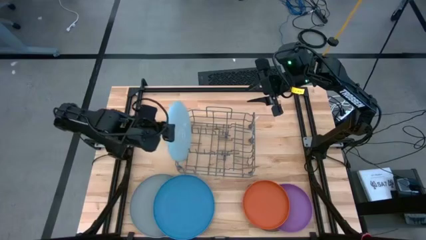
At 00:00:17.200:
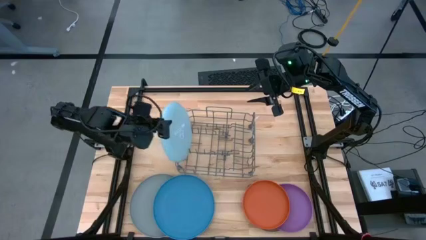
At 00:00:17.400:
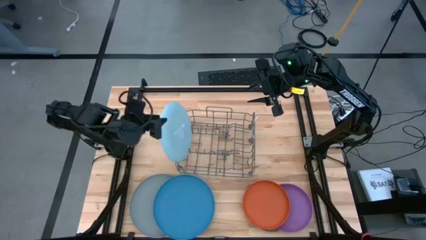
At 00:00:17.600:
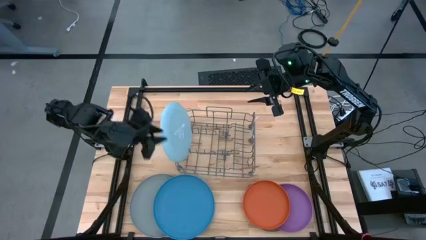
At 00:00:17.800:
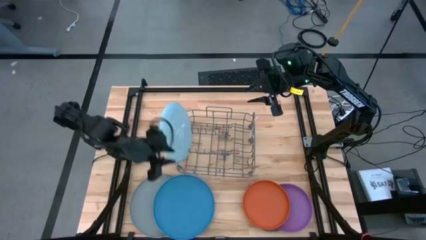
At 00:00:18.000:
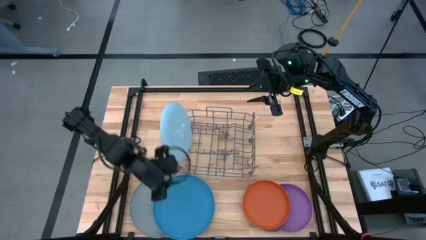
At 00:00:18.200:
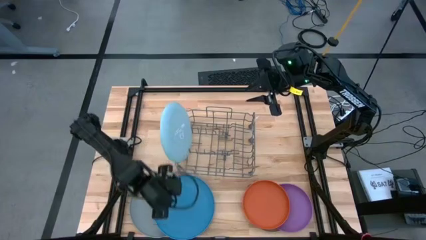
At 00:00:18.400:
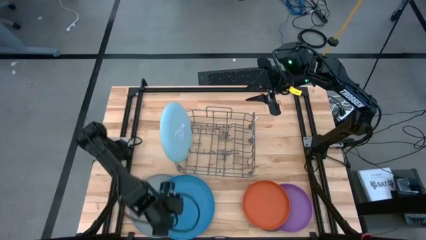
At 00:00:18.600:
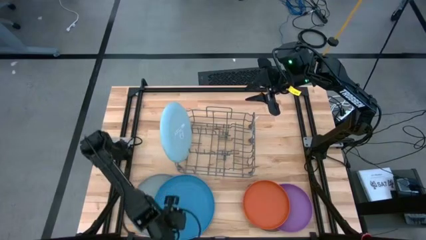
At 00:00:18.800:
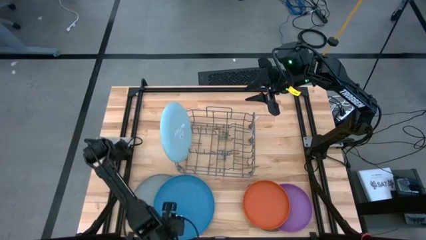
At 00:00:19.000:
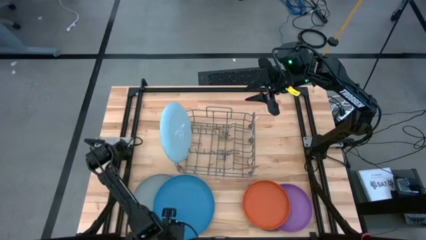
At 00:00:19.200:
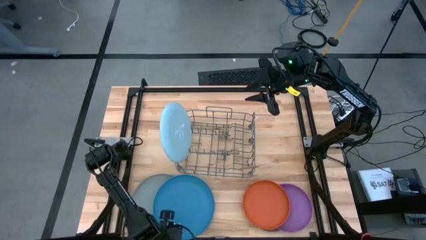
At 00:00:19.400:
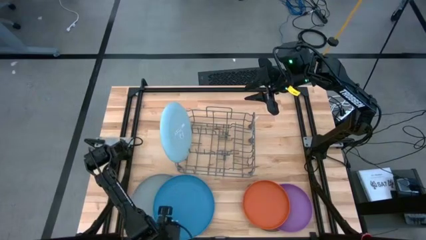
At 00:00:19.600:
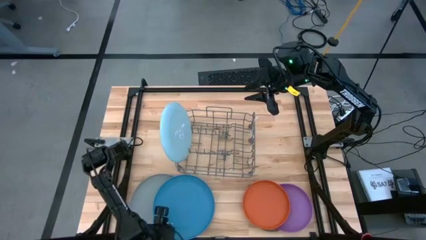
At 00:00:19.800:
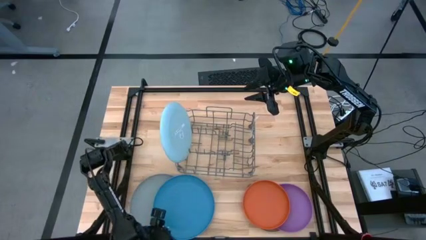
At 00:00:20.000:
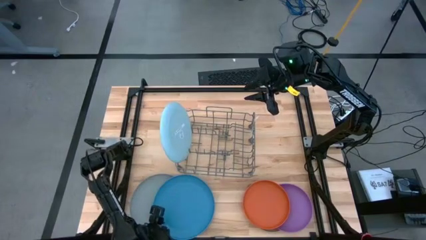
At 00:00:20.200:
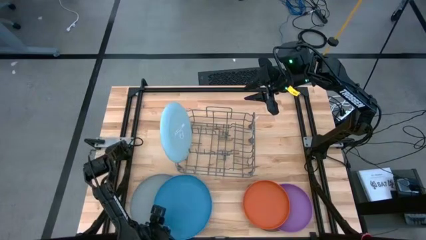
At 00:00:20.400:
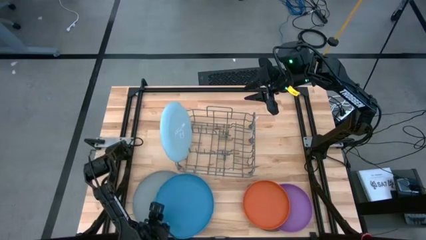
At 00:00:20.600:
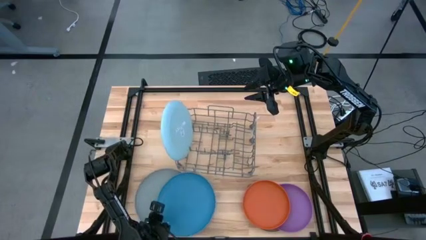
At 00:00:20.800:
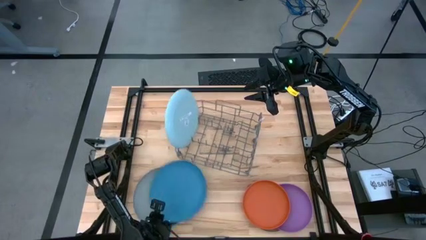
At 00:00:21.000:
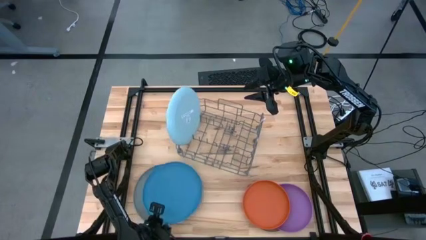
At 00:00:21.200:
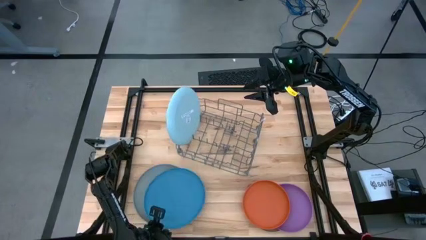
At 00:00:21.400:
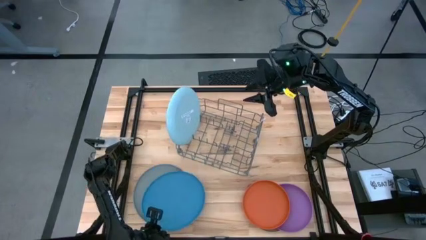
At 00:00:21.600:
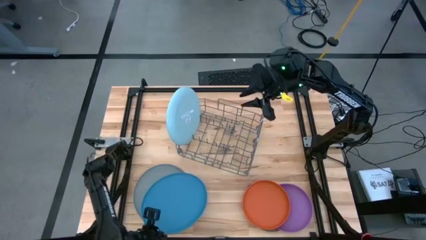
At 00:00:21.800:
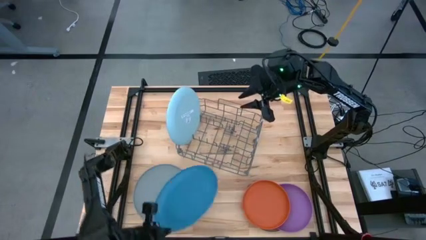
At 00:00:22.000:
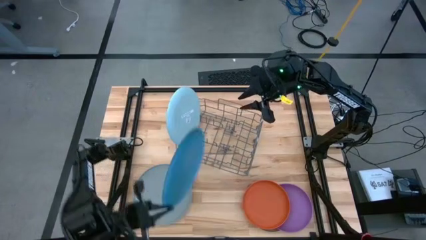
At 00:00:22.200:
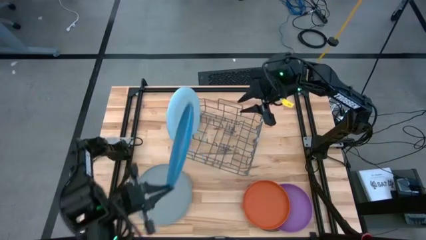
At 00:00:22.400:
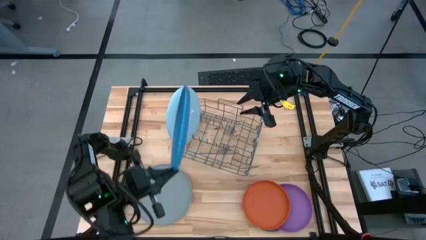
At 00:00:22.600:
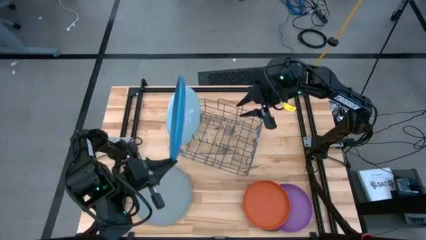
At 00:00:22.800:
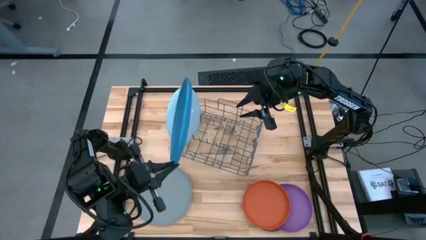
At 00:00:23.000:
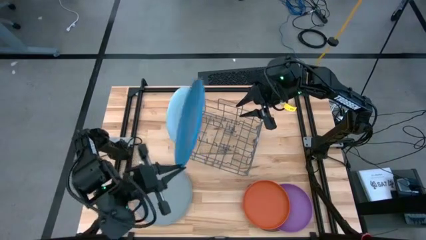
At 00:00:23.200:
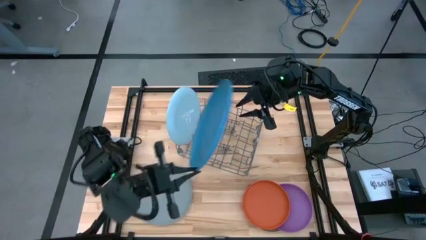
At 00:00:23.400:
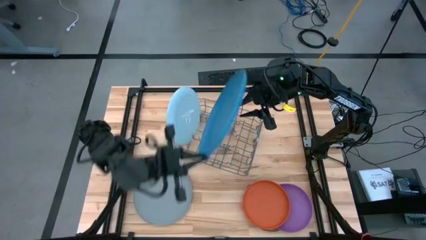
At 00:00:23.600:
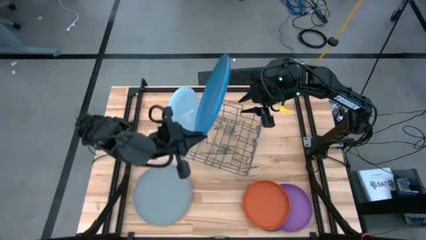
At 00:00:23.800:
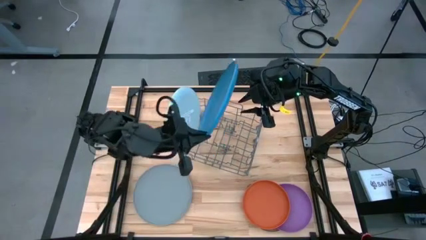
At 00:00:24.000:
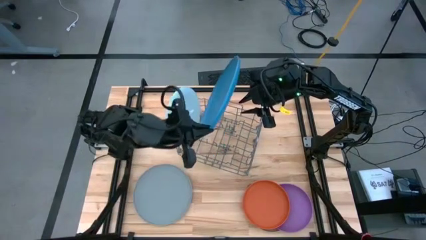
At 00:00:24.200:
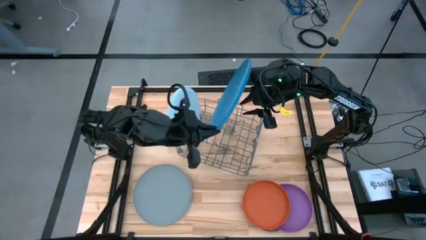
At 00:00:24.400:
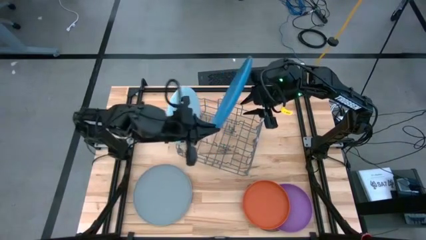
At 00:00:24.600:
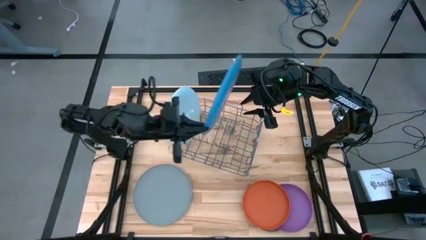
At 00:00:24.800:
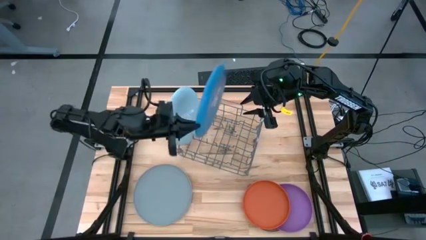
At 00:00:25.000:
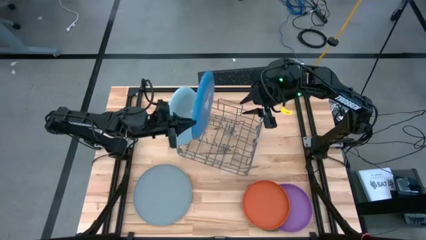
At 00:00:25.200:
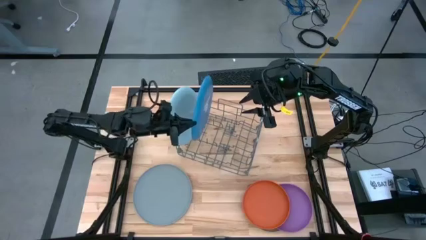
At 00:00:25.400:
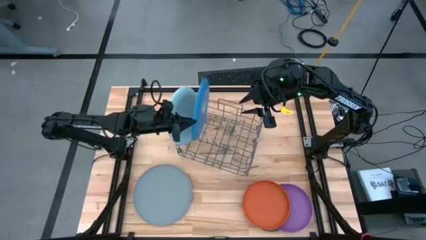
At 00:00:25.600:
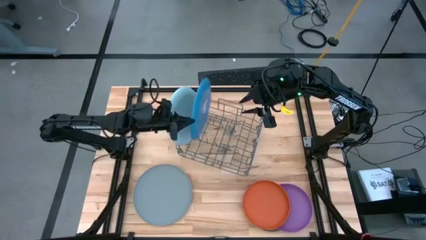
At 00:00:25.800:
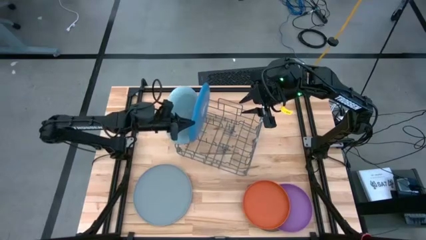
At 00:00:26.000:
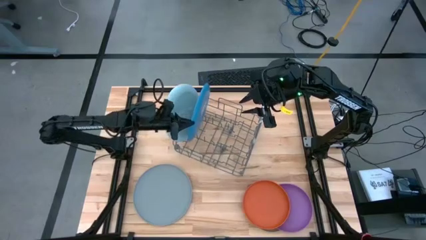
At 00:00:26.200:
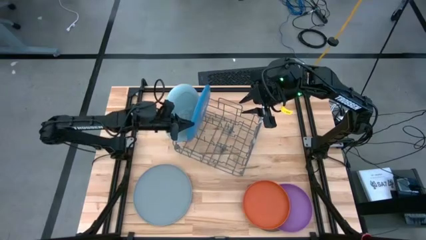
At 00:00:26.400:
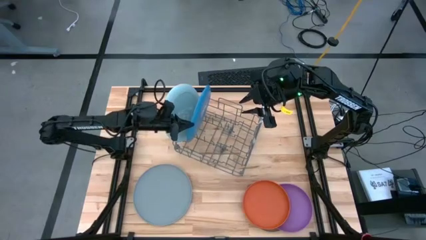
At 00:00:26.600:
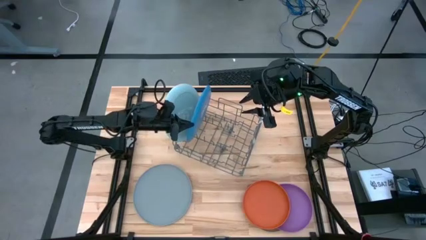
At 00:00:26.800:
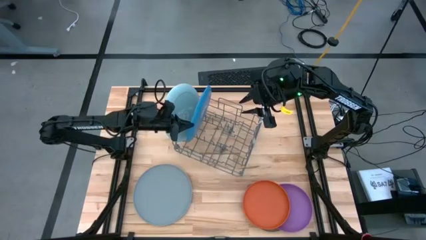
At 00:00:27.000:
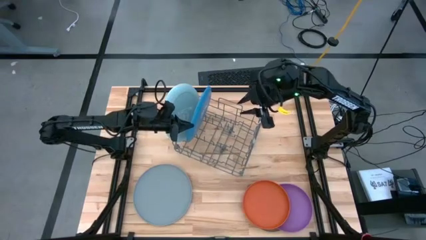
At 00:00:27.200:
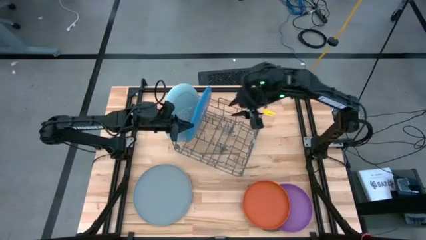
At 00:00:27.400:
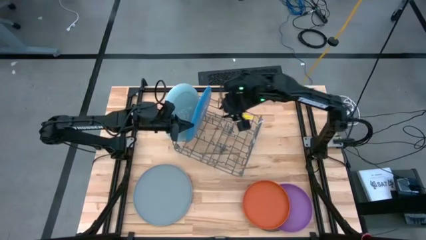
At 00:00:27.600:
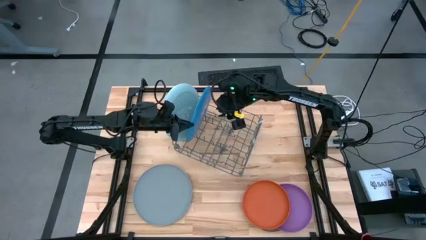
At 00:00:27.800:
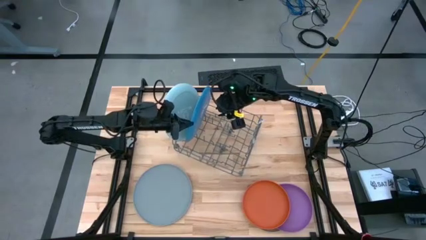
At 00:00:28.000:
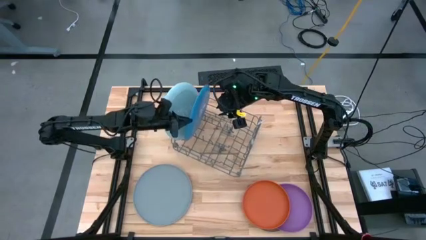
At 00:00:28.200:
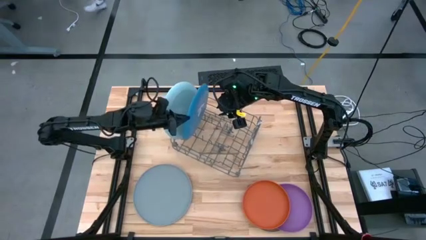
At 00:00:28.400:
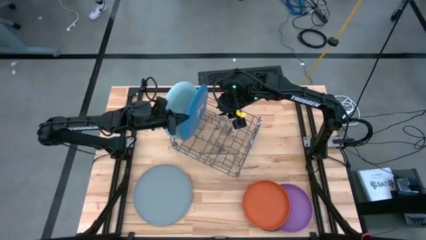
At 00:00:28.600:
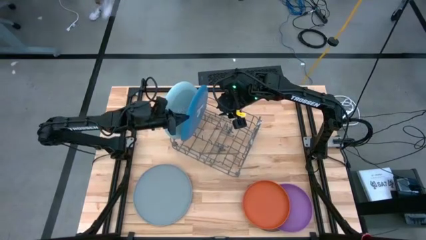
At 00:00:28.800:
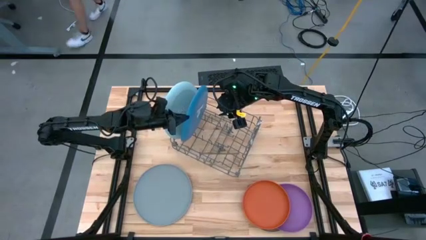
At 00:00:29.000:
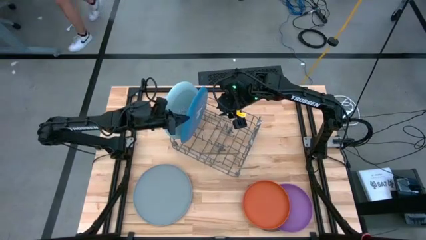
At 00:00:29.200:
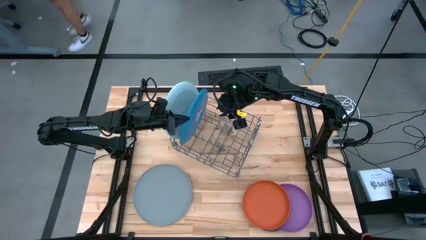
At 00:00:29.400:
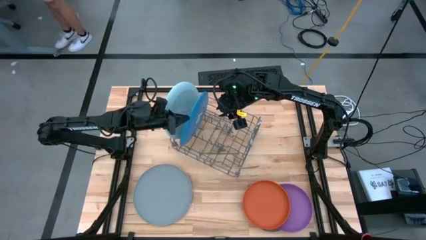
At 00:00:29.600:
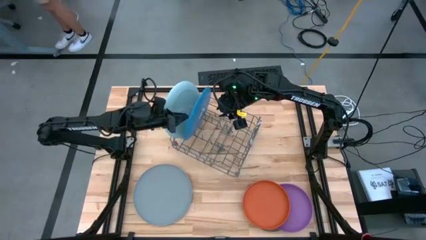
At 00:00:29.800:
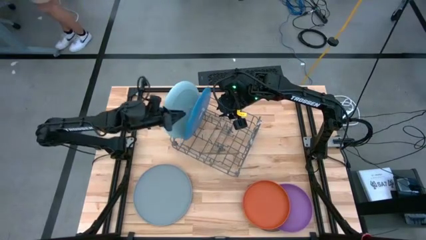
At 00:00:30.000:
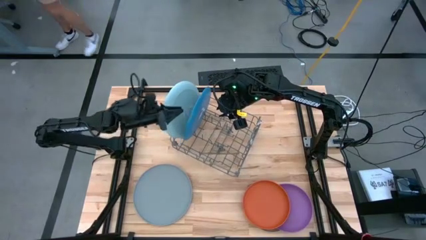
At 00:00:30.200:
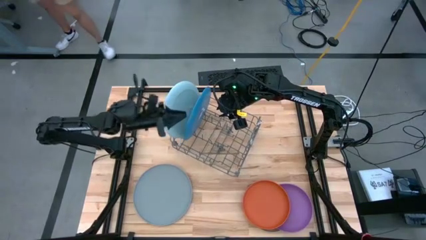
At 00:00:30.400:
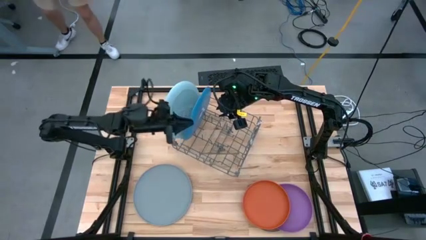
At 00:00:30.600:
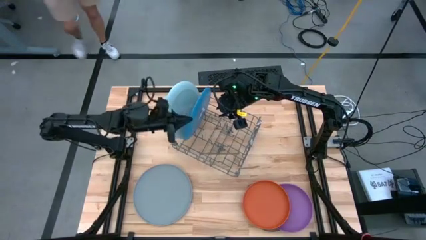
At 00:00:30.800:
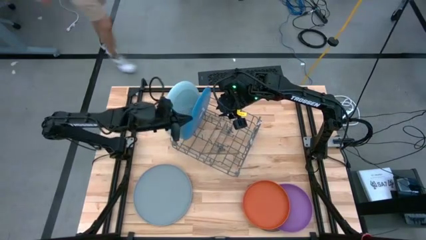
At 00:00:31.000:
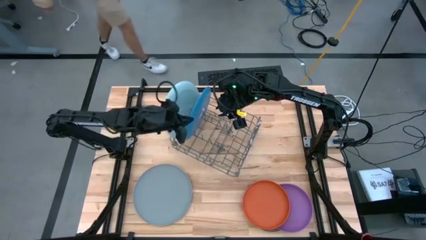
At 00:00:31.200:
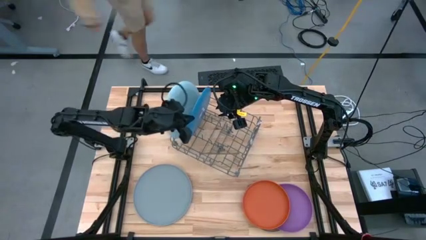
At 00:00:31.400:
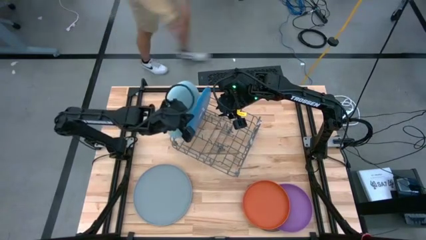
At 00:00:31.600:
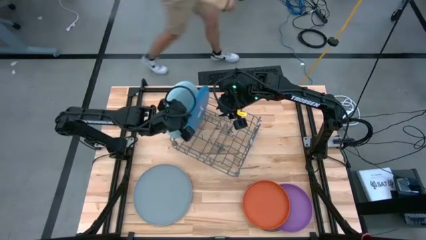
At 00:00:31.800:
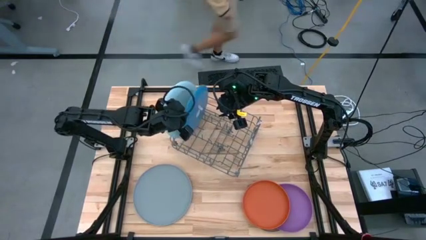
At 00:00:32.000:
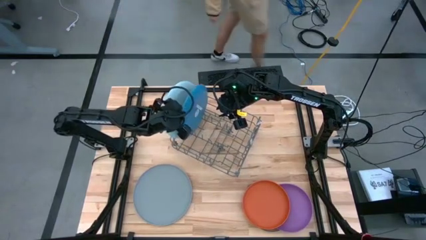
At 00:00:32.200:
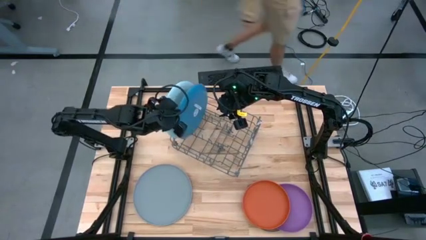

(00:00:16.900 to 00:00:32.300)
Task: Sort dishes
Put the blue plate in the dish rack
